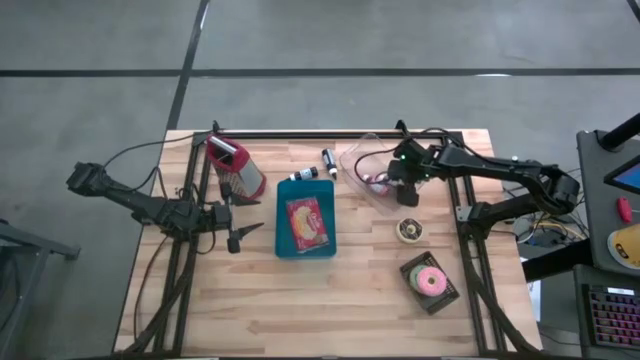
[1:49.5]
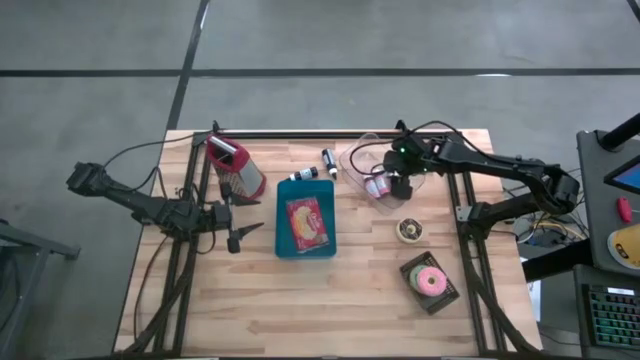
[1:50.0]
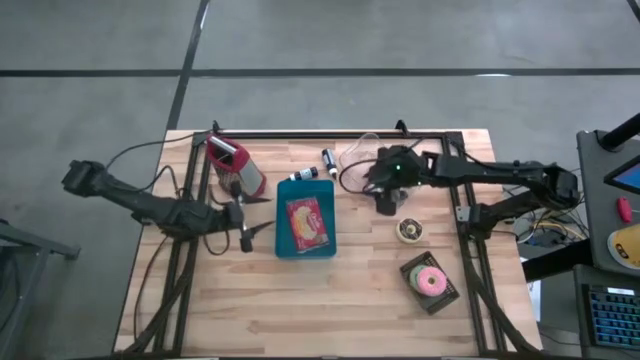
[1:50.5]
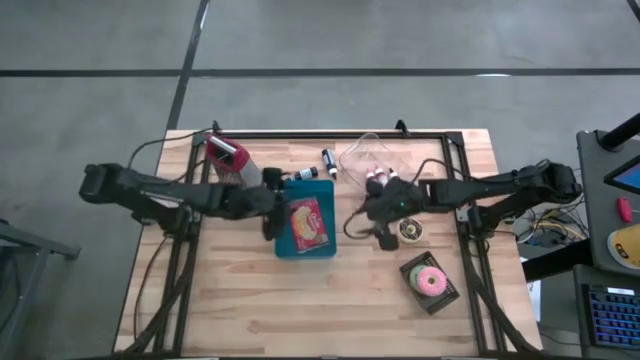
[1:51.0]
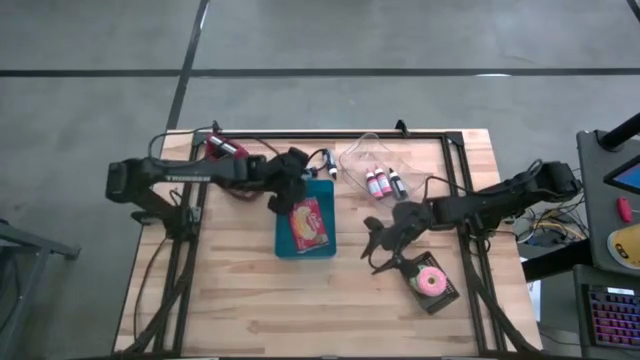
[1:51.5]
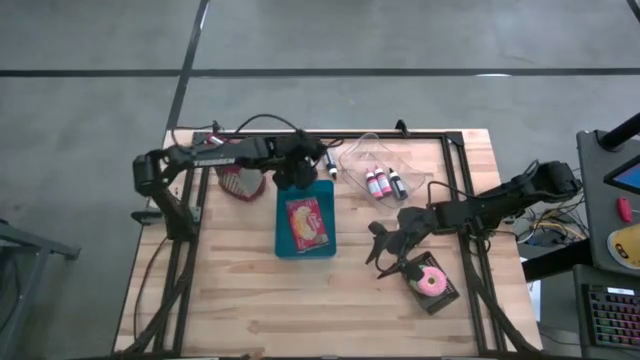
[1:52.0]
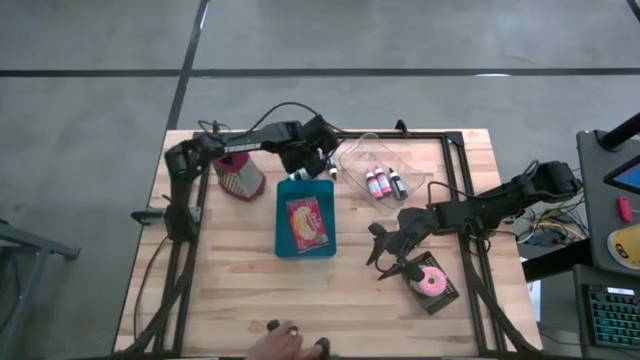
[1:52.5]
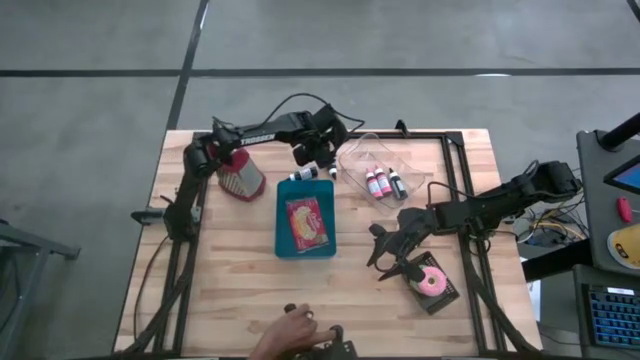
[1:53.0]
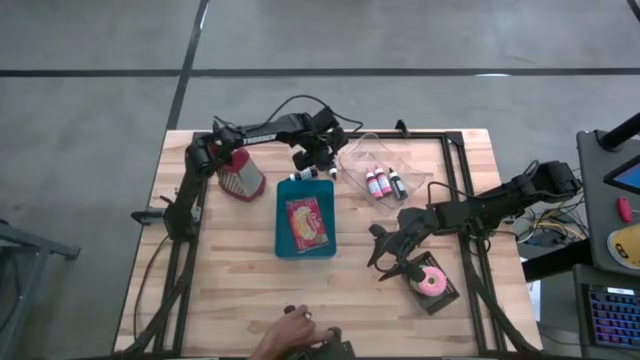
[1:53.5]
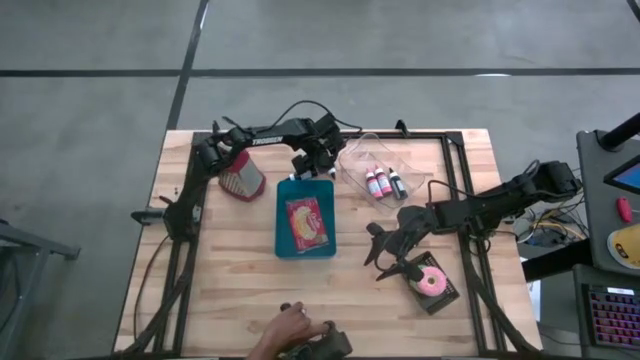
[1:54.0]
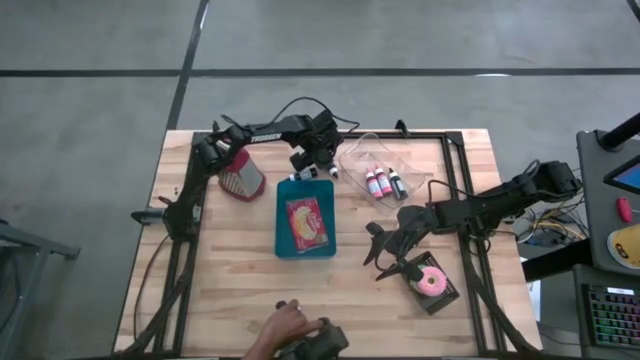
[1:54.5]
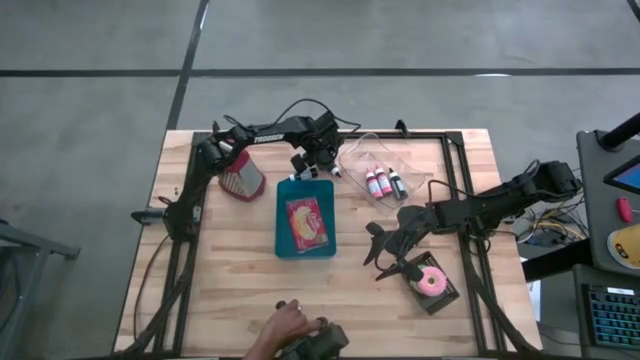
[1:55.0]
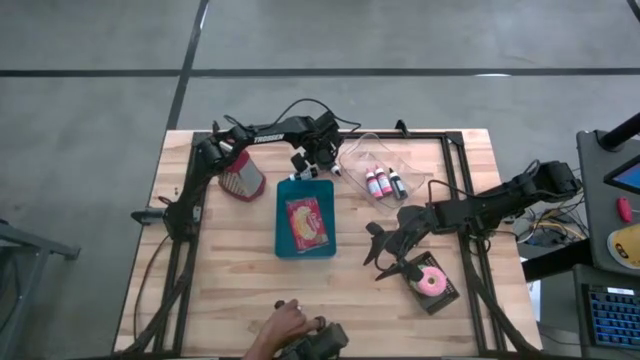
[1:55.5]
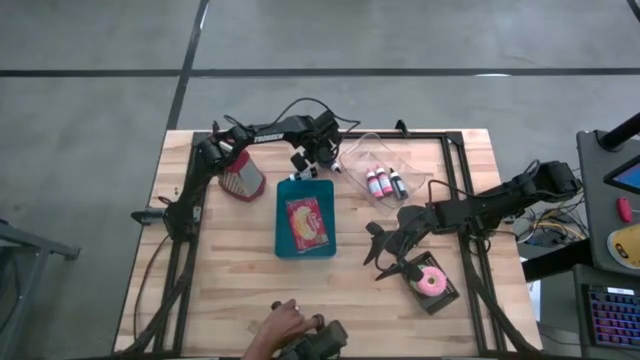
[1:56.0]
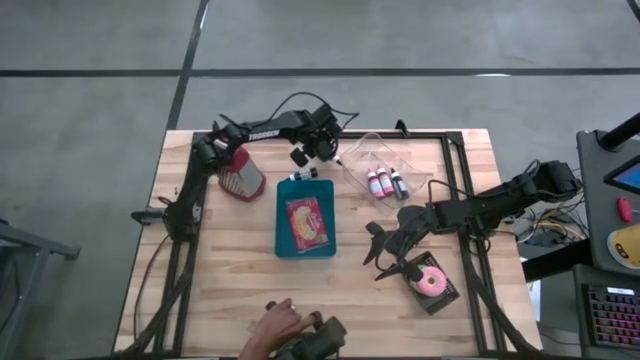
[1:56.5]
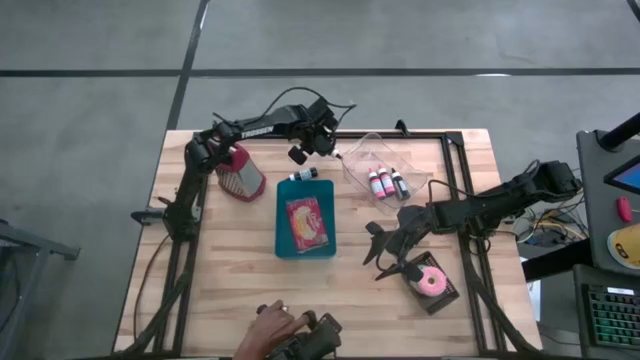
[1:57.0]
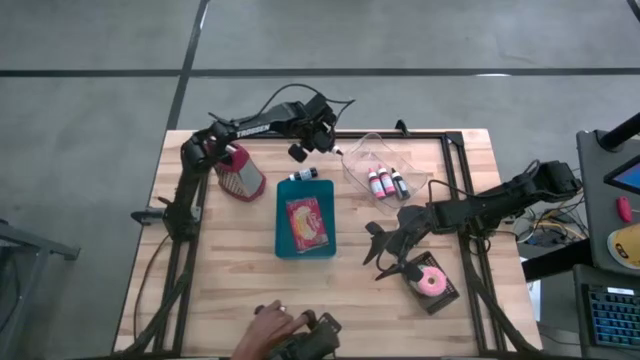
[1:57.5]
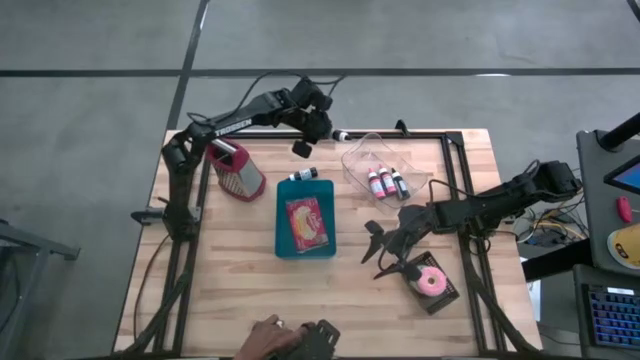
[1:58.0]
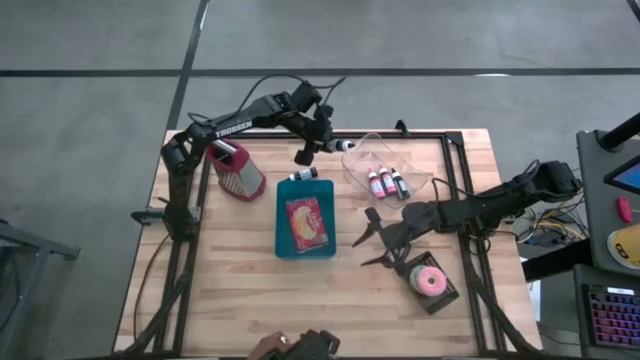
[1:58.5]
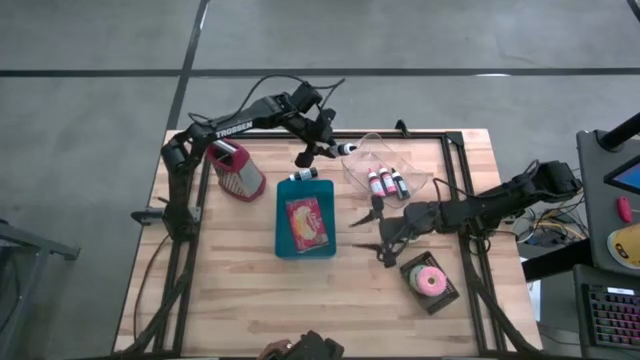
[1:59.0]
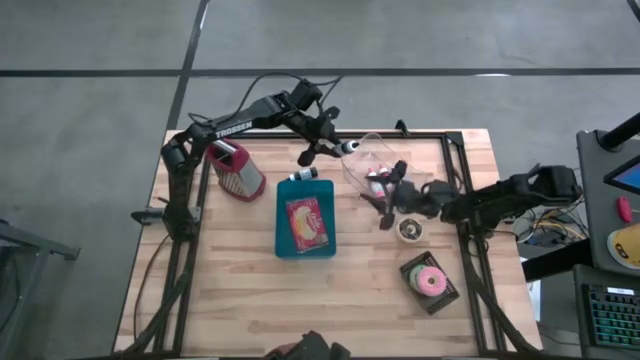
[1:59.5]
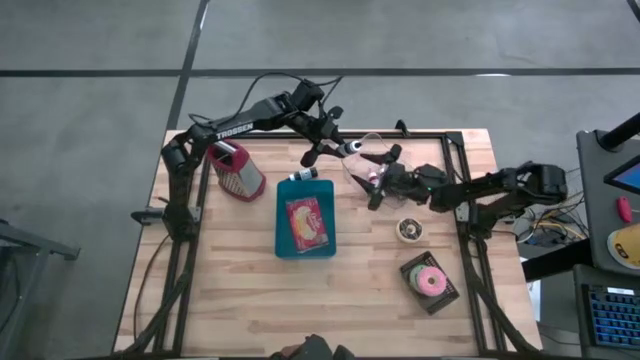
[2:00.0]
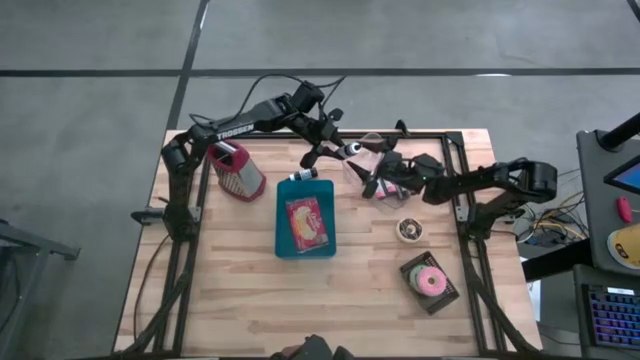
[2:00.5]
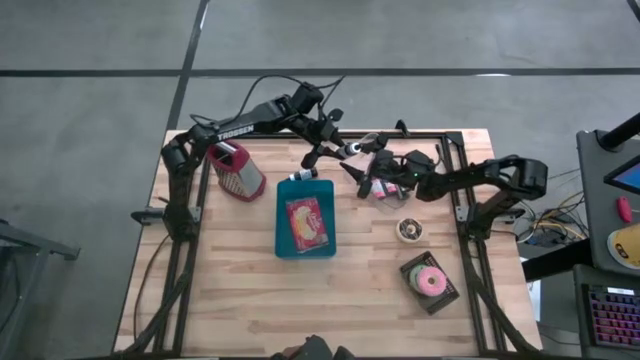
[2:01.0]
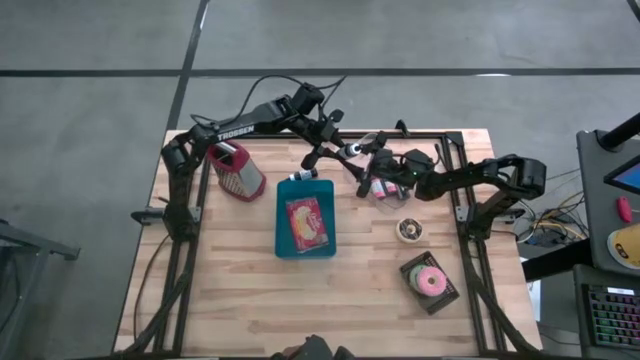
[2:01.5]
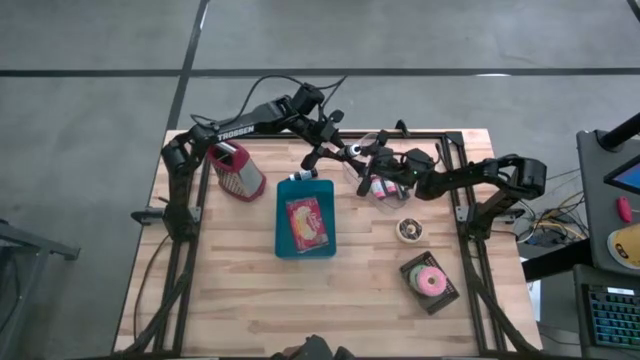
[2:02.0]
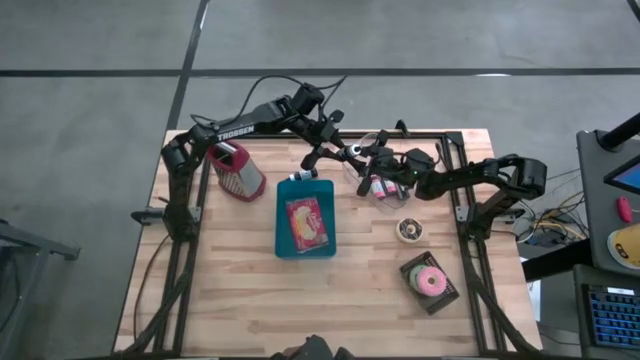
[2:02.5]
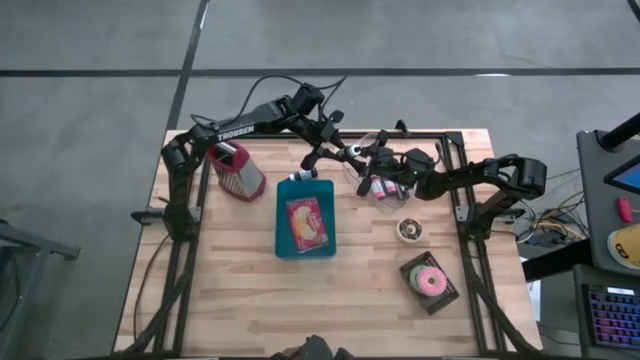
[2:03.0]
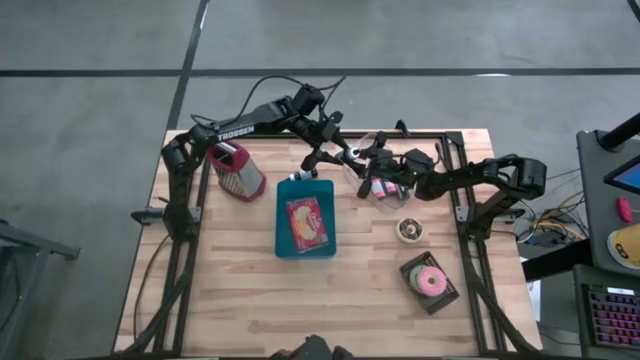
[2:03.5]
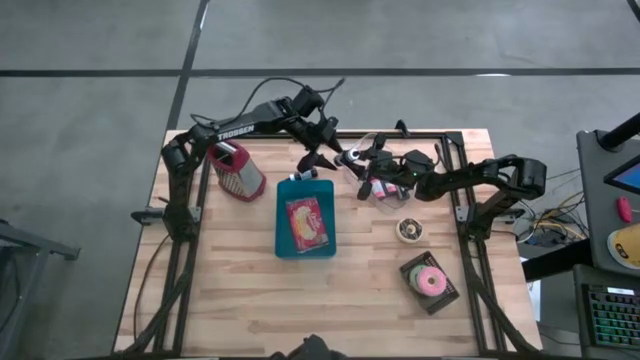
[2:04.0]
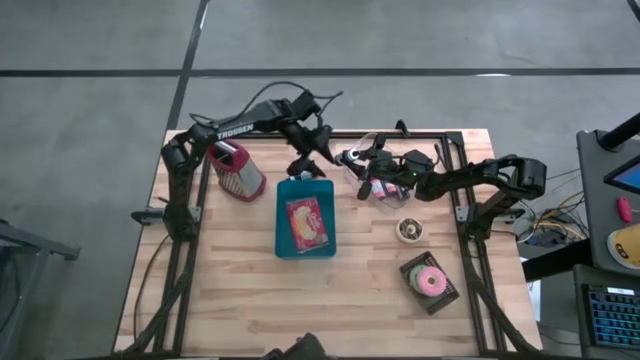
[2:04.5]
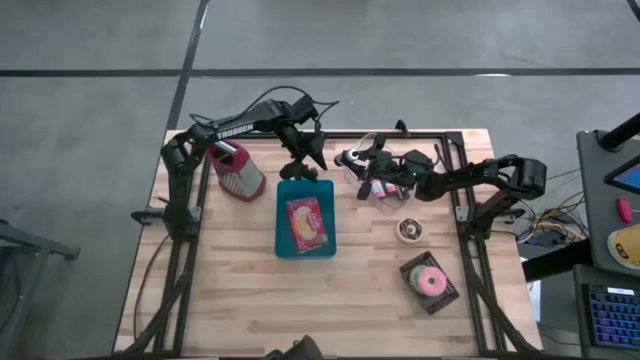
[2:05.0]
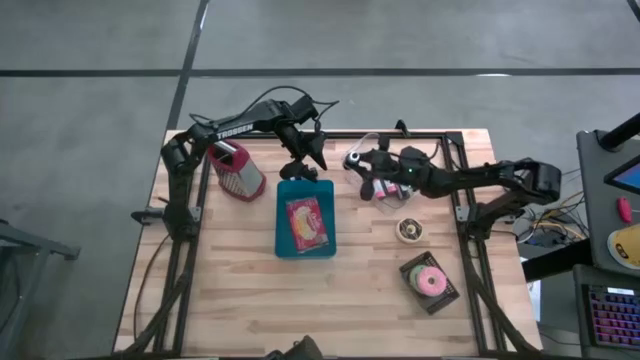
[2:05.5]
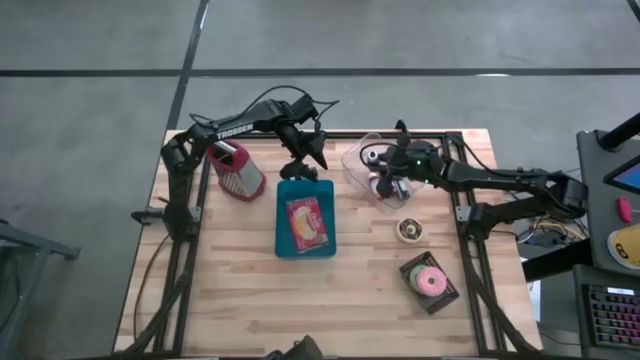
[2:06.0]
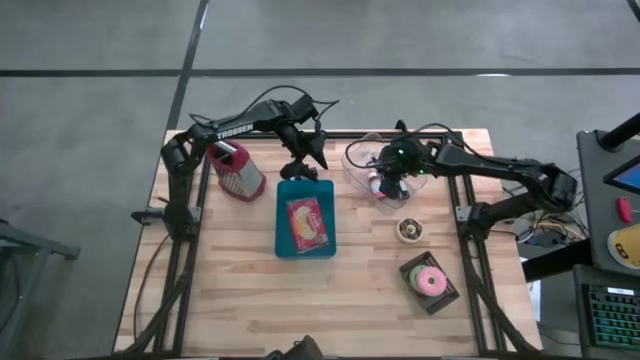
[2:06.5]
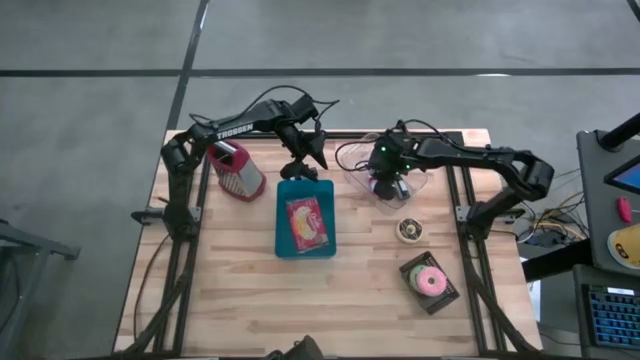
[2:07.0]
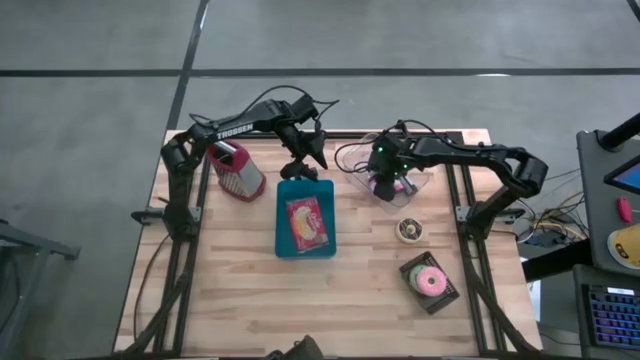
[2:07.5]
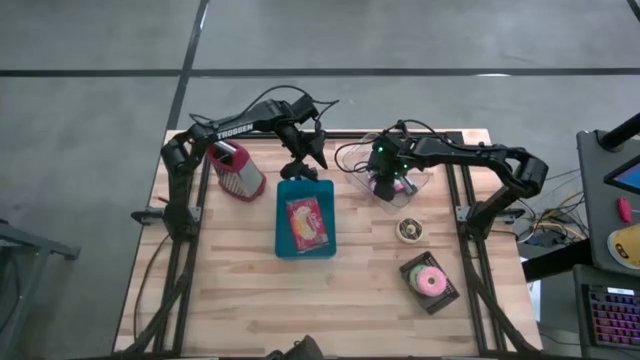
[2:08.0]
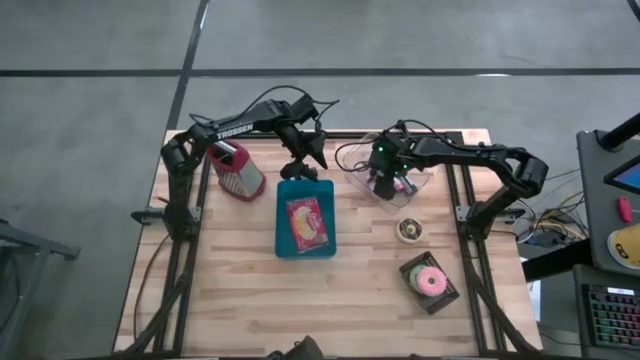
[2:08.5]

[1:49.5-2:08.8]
Task: Pick & Place Food Item
Put the top black food coloring bottle into the transparent bin

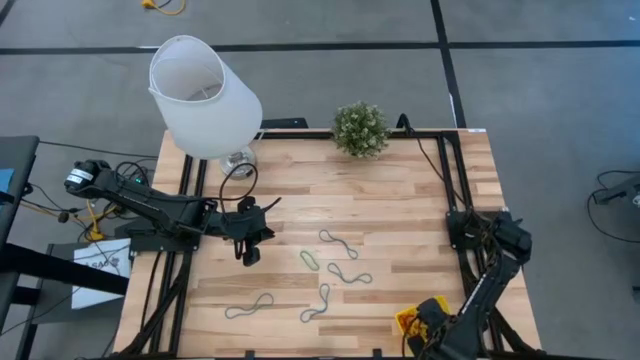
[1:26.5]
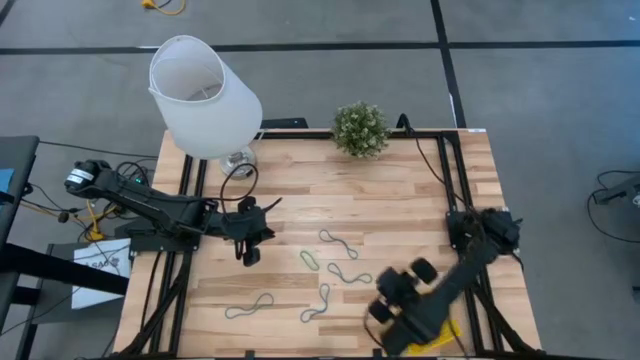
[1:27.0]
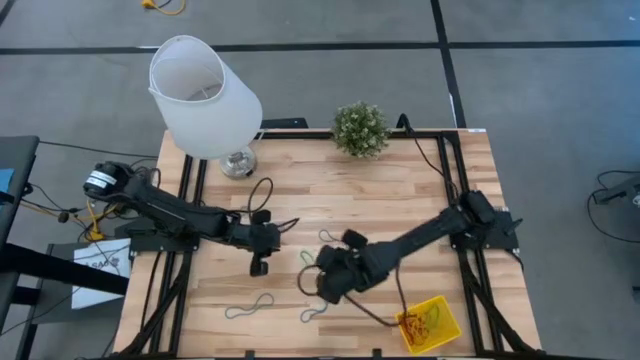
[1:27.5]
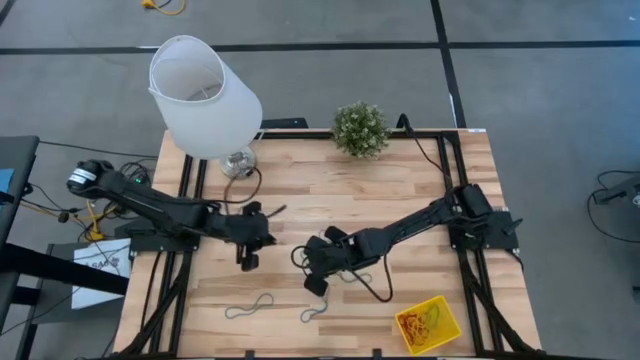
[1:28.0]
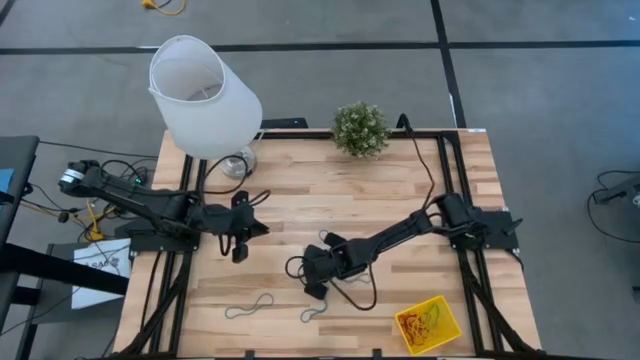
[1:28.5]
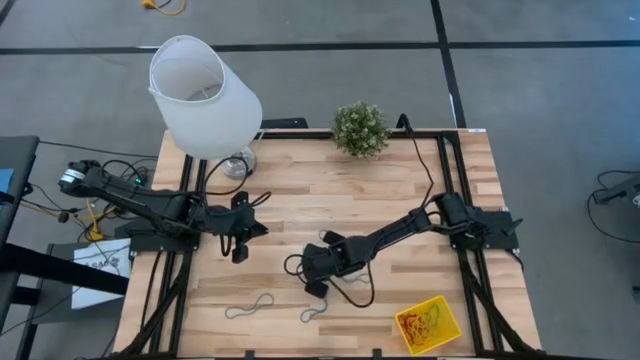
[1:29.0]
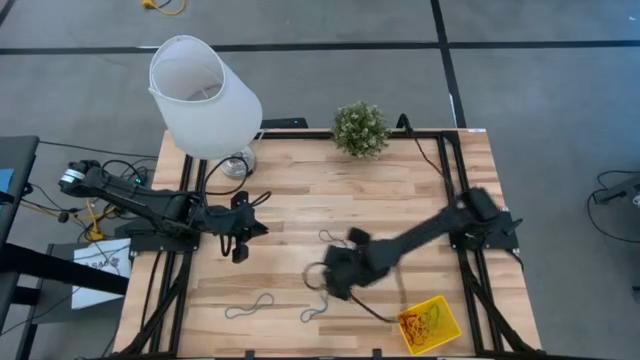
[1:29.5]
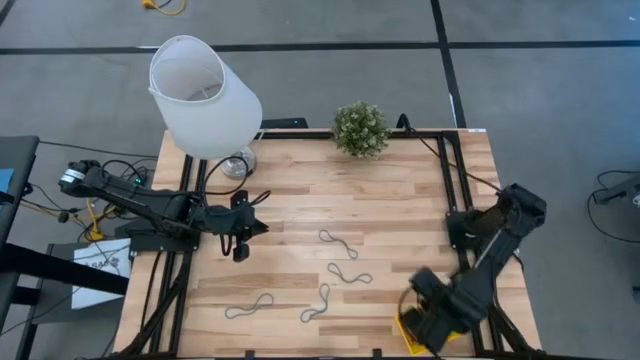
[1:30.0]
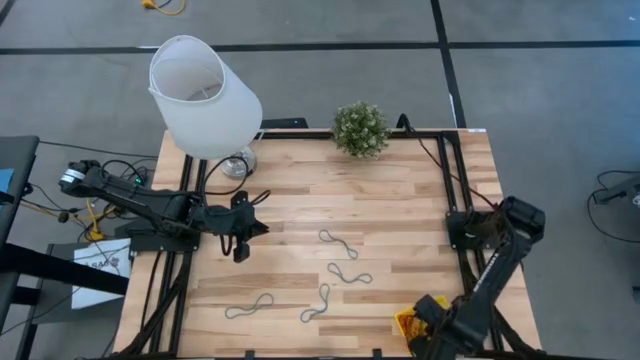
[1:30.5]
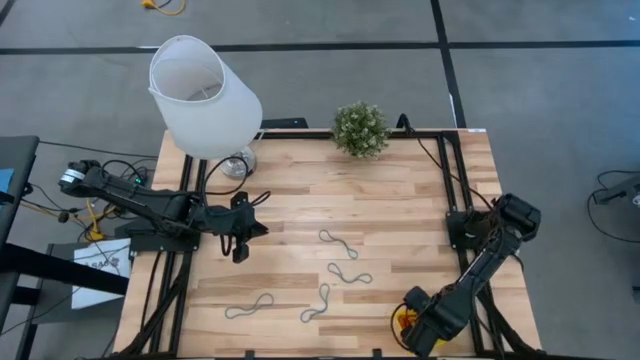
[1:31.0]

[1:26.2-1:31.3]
Task: Pick and place rubber bands into bin
Put the green rubber band into the yellow basket
